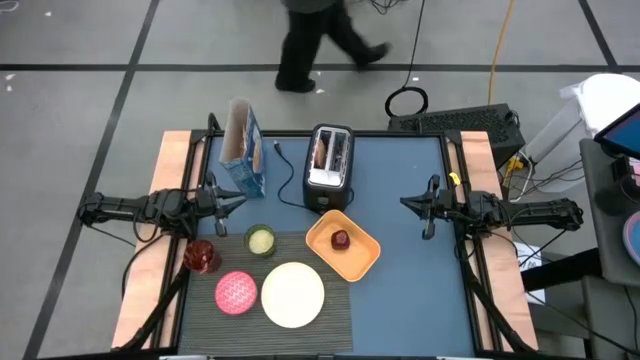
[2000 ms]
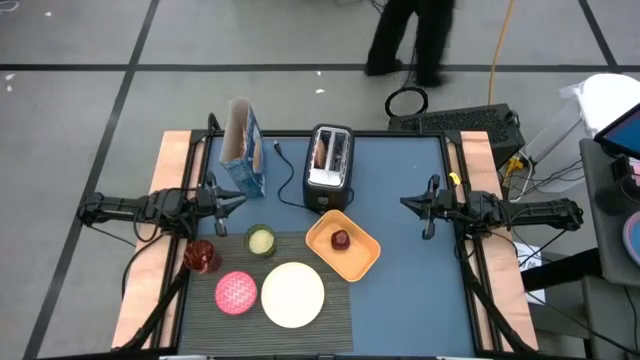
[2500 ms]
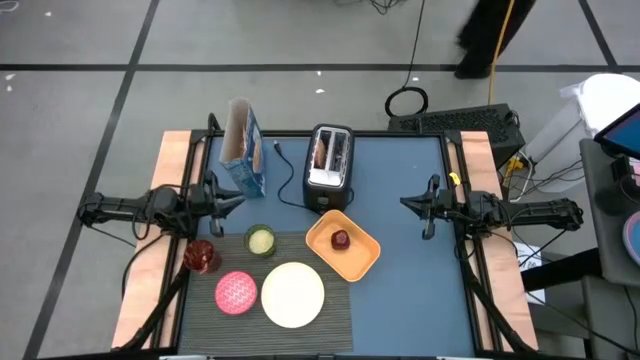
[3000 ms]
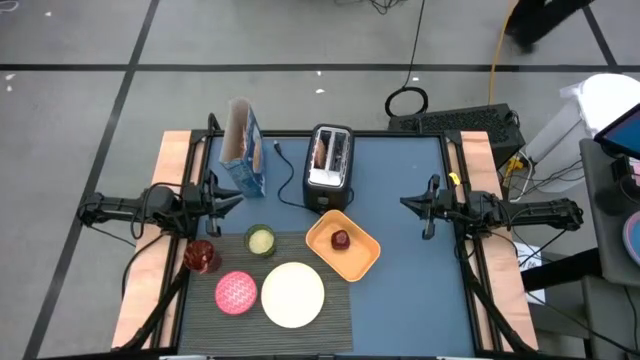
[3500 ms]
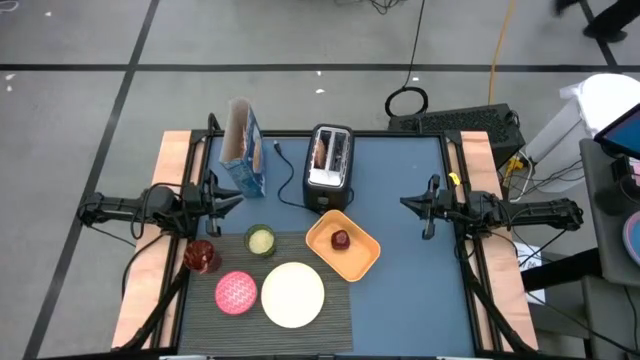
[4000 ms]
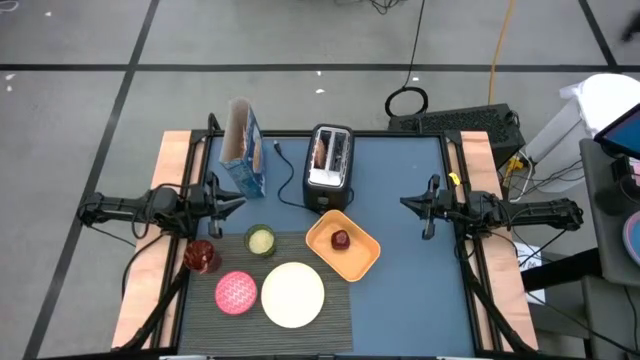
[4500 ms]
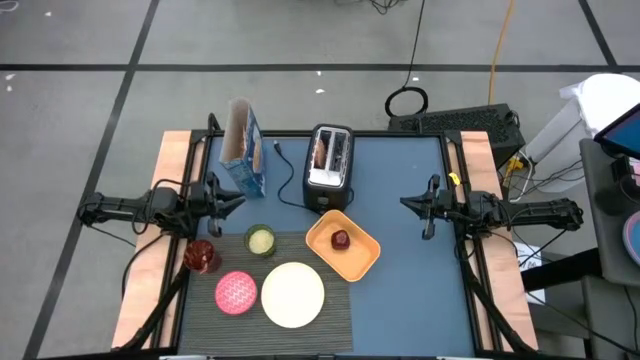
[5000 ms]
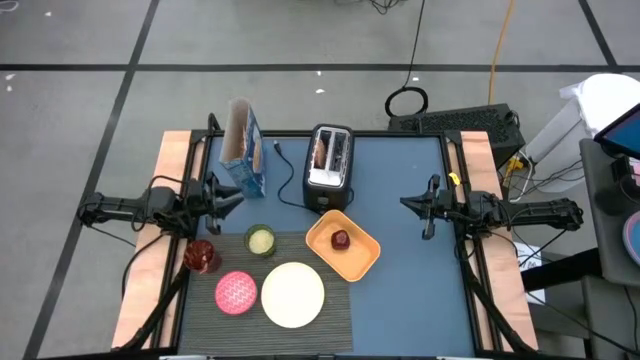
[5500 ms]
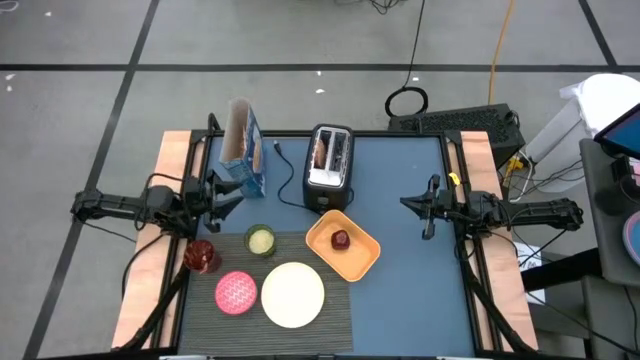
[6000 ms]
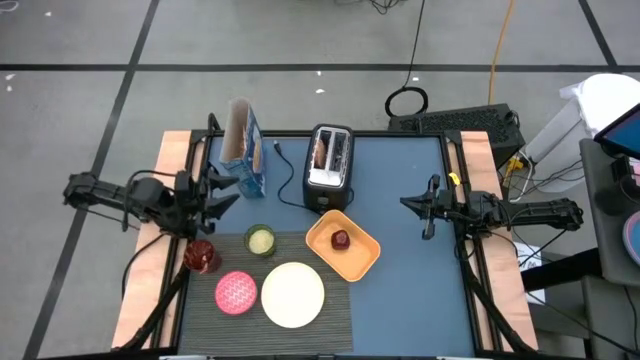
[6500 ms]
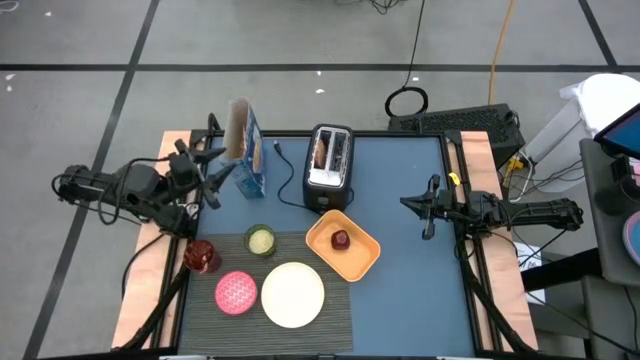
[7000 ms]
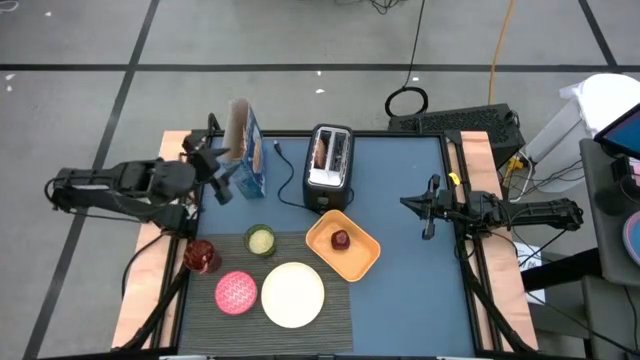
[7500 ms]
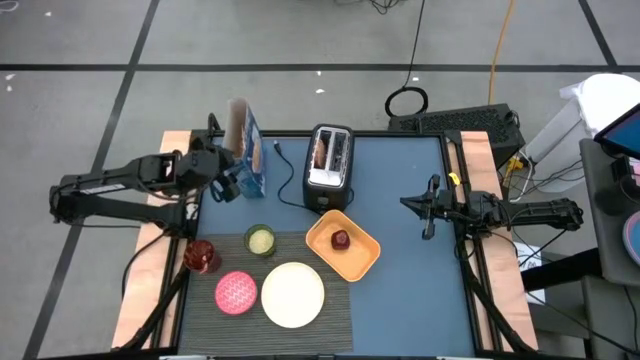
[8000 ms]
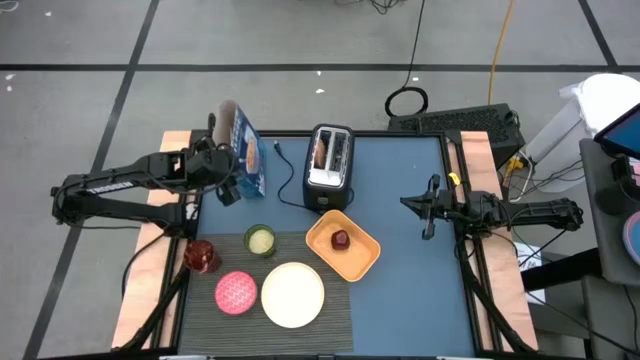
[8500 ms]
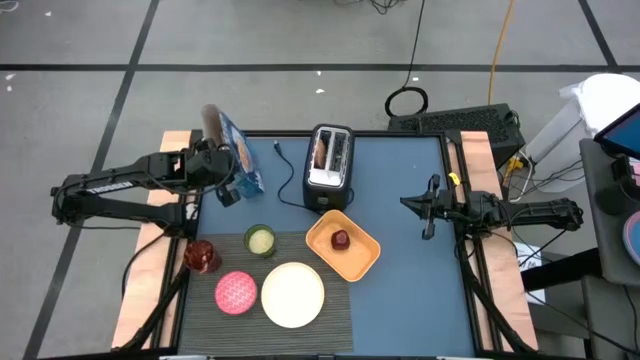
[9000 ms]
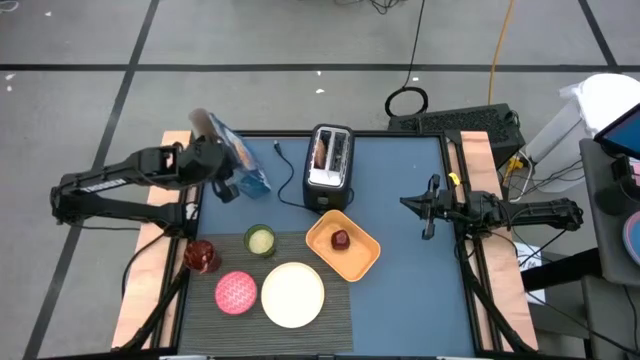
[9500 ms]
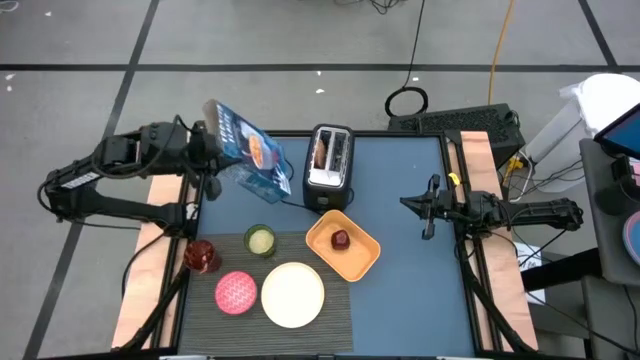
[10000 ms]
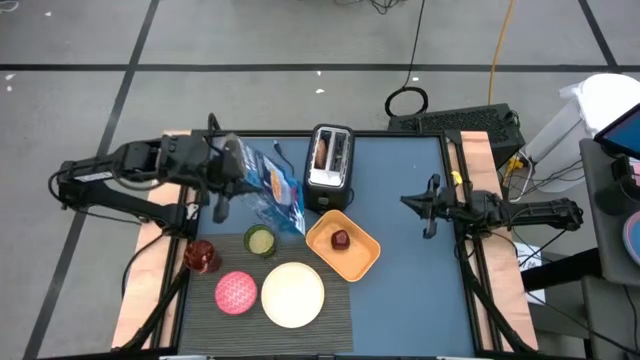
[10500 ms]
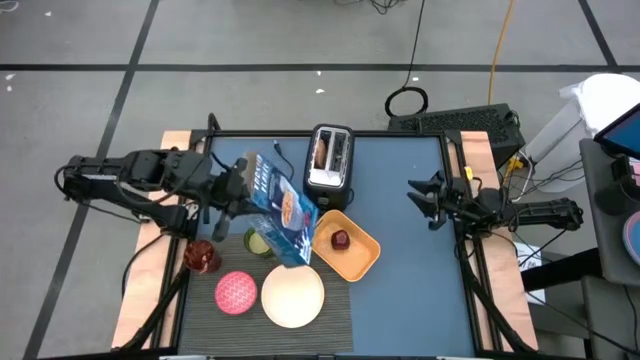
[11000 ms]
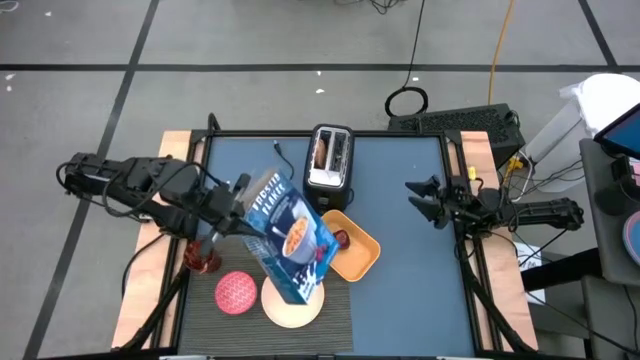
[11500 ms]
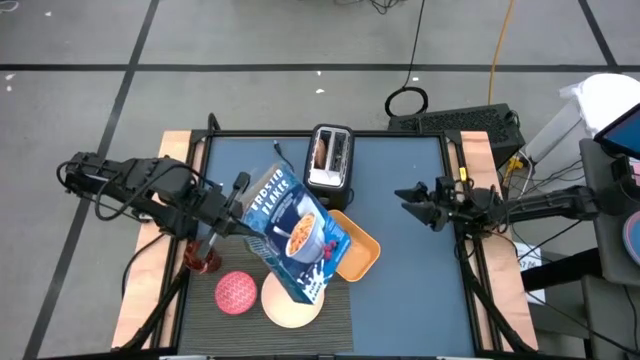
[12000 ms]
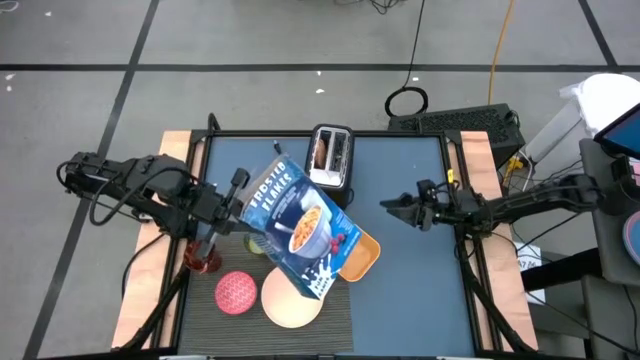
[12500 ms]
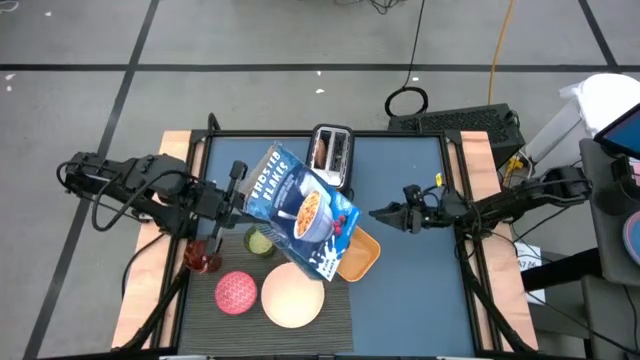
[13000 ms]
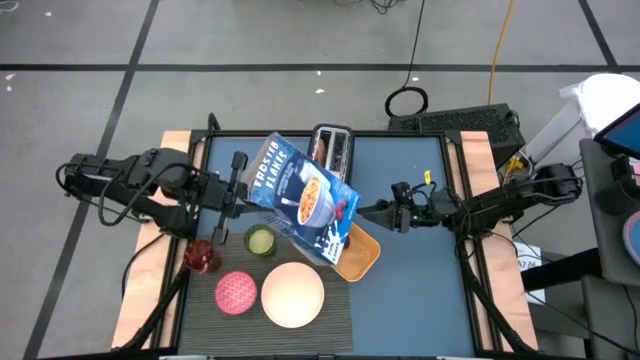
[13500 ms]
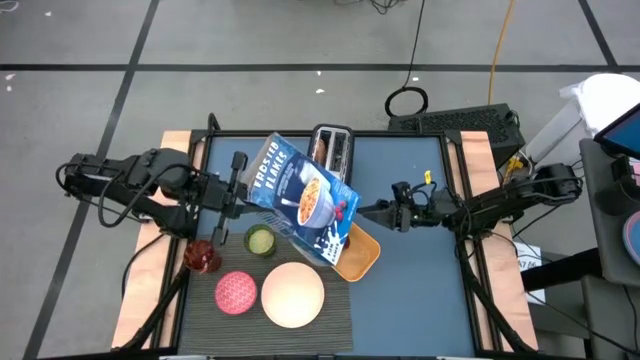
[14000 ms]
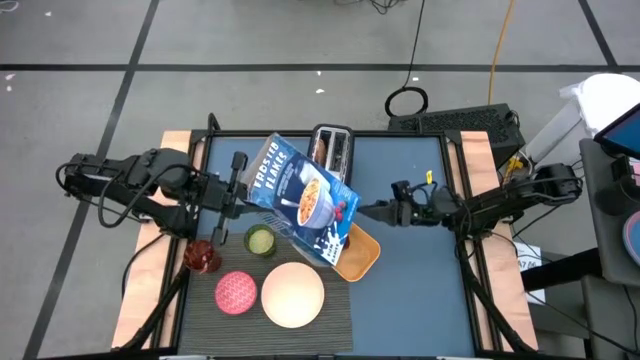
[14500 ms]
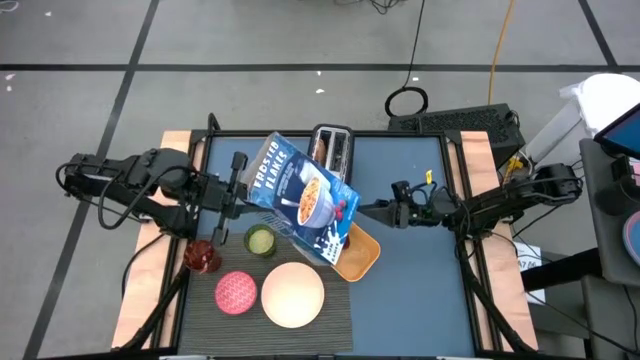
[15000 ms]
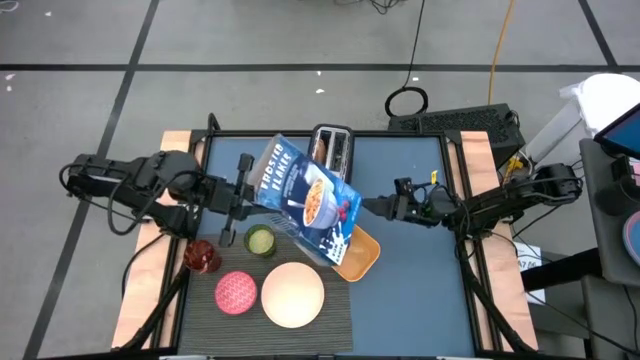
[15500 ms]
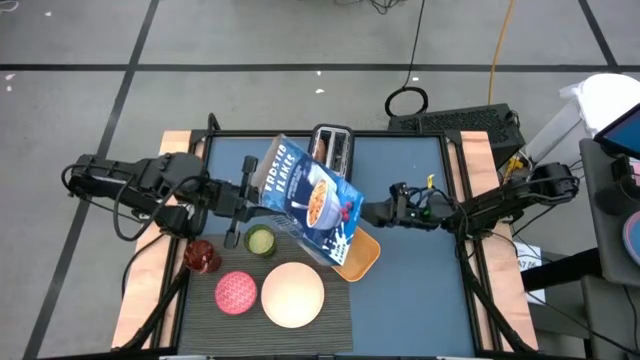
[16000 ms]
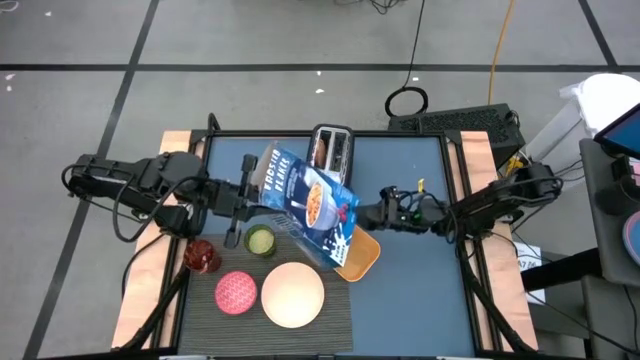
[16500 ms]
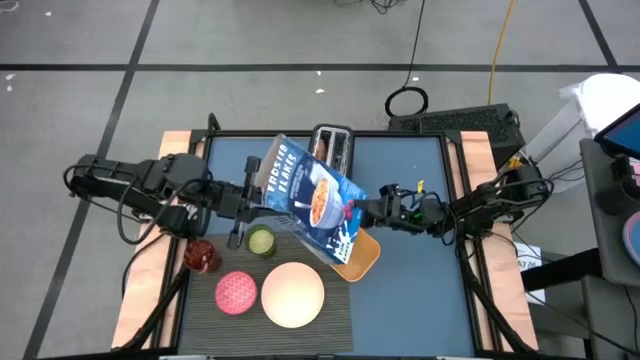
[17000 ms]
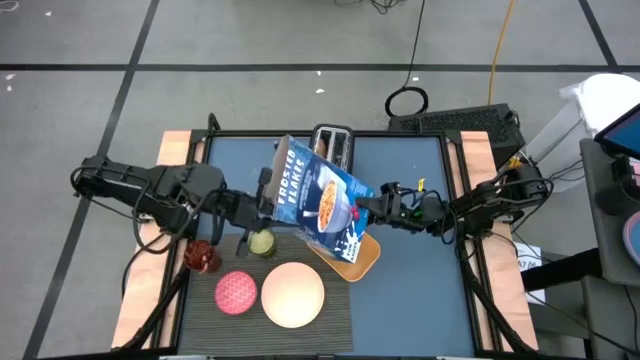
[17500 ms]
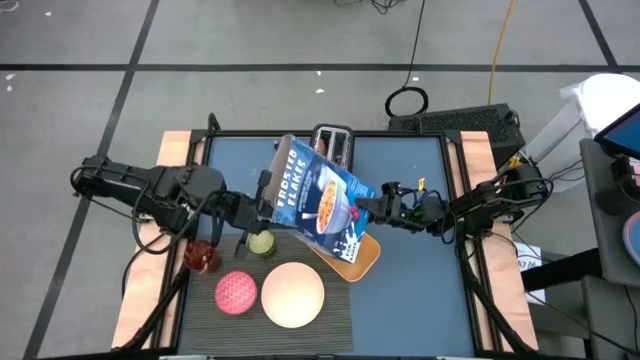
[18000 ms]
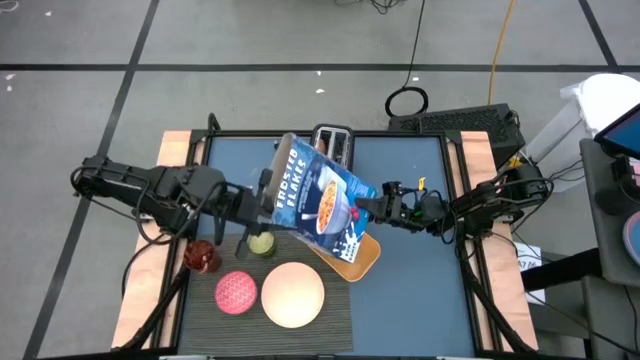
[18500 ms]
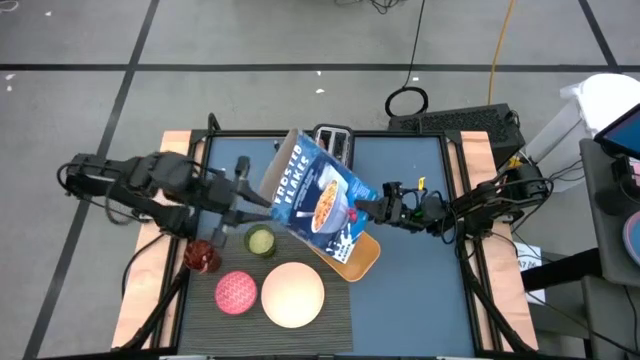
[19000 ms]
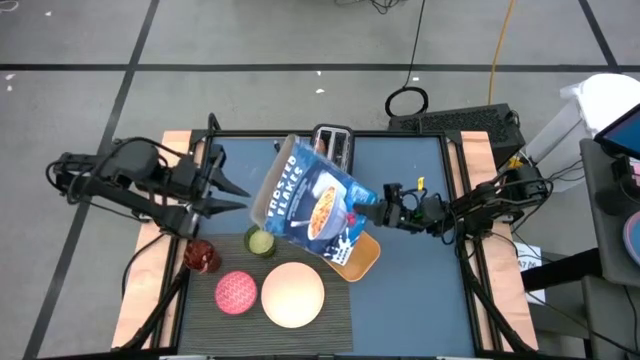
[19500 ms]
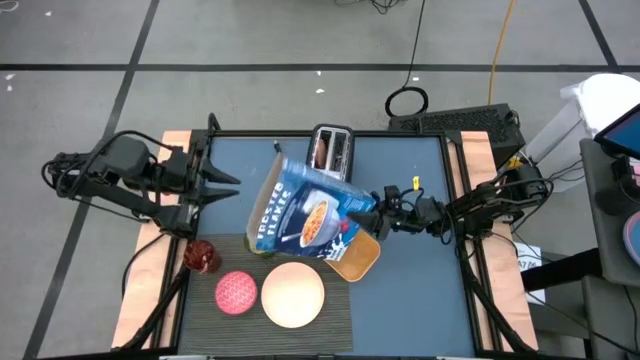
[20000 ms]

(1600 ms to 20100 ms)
Task: Arrange a breakfast setting
Pour the cereal from the blue cereal box into the red bowl

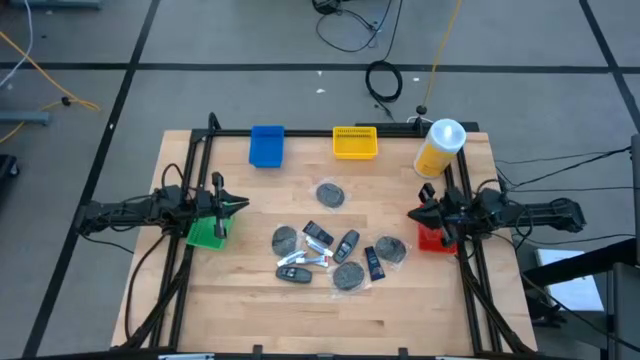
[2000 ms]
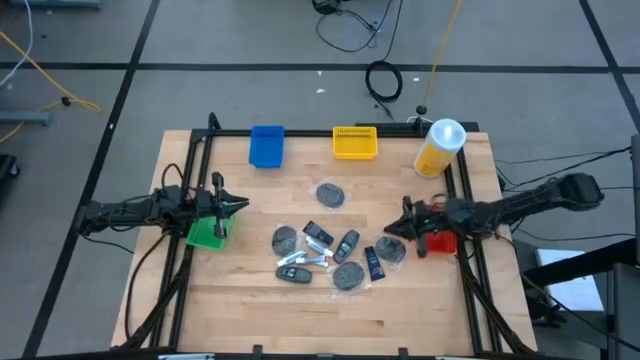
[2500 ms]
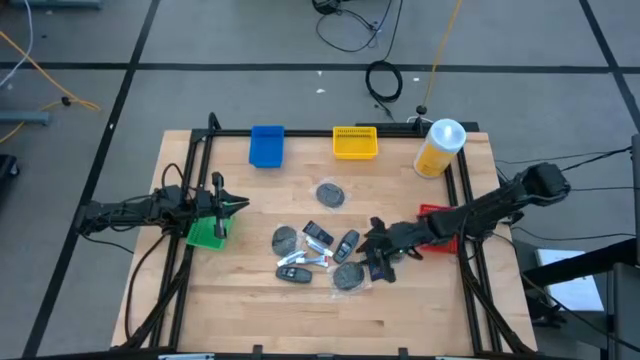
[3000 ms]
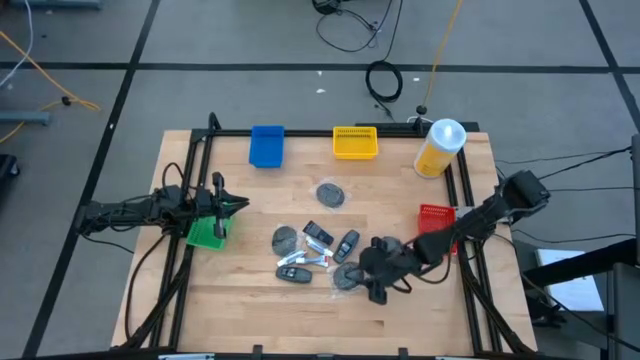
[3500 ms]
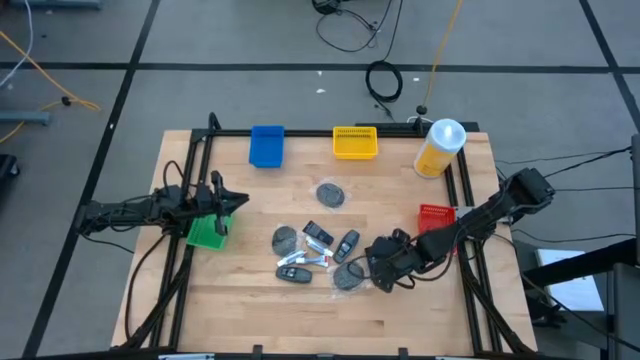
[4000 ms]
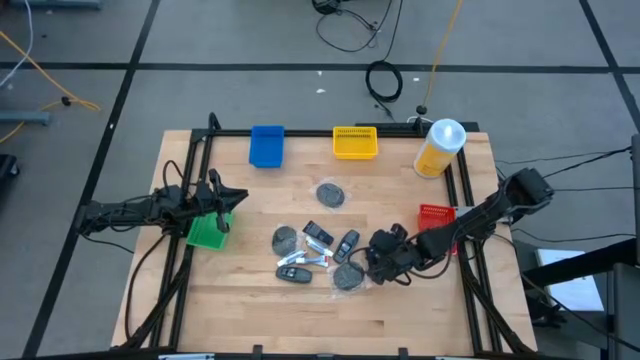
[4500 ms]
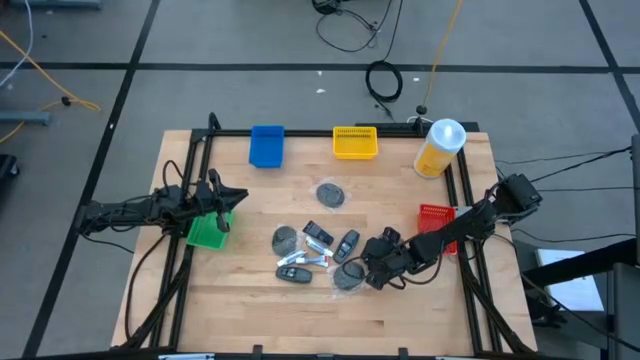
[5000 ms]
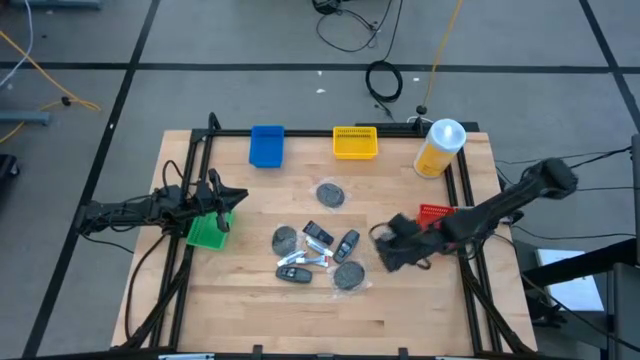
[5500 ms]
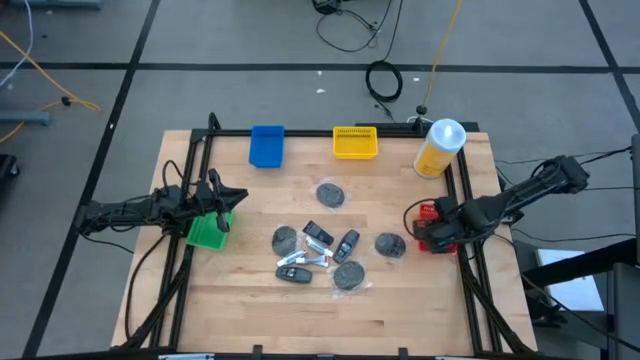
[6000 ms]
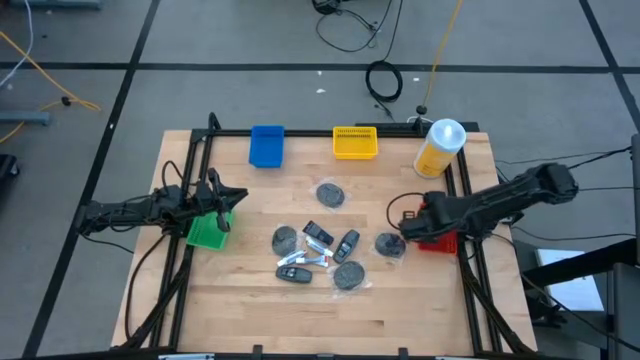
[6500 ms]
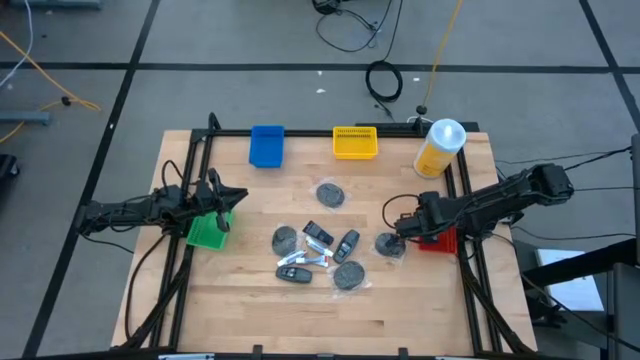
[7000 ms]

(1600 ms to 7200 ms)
Task: Pick & Place Travel size toiletries
Put the blue shave cream into the red bin
